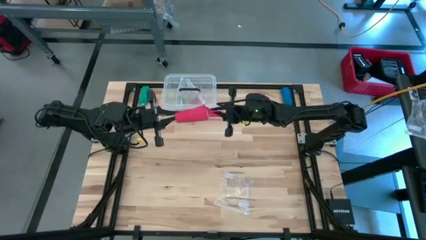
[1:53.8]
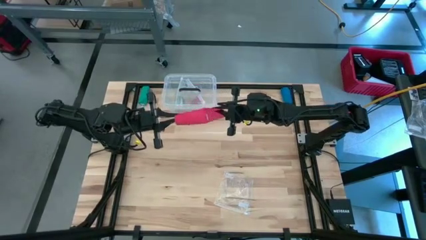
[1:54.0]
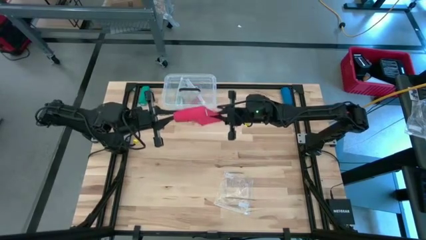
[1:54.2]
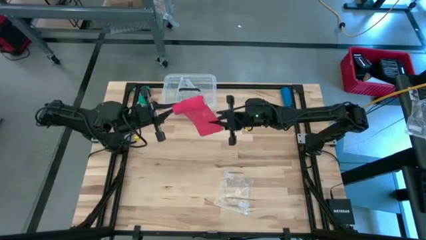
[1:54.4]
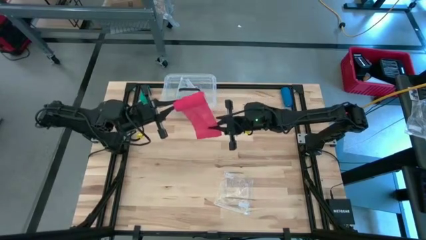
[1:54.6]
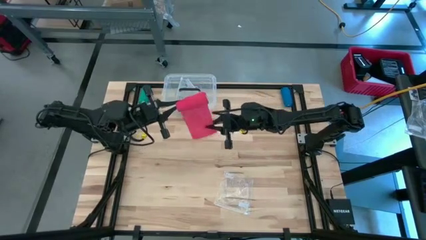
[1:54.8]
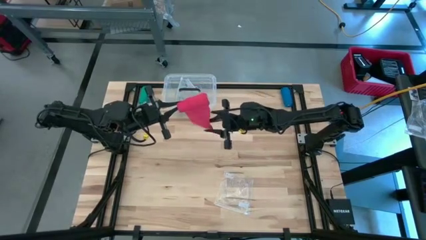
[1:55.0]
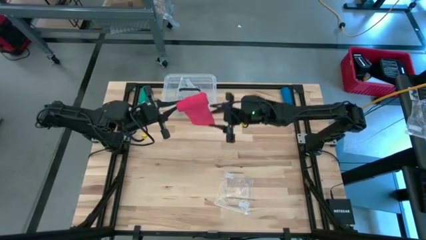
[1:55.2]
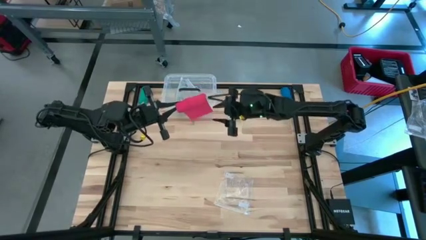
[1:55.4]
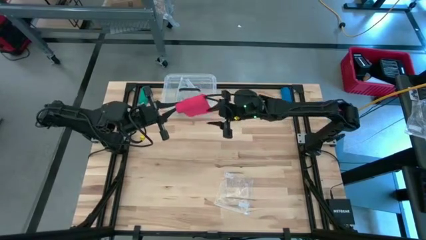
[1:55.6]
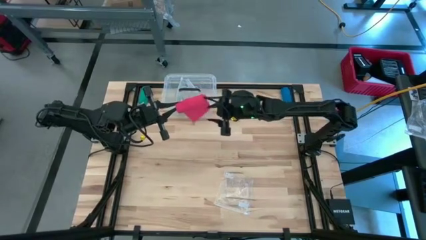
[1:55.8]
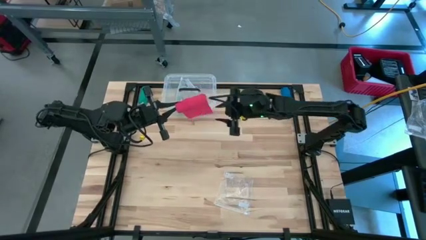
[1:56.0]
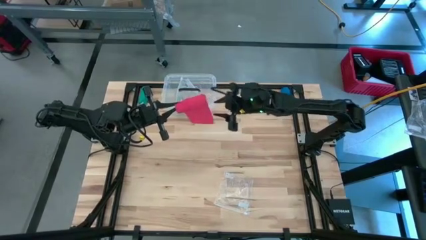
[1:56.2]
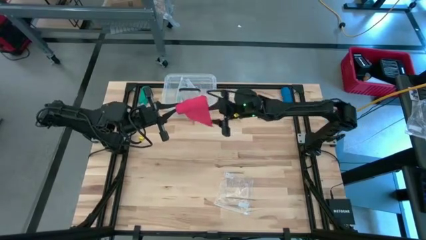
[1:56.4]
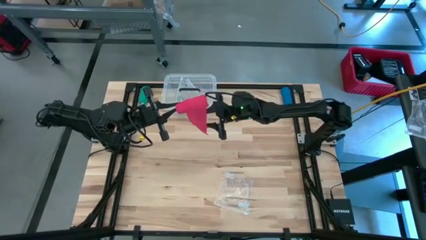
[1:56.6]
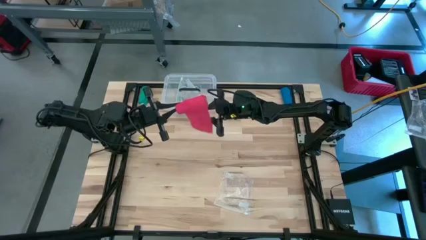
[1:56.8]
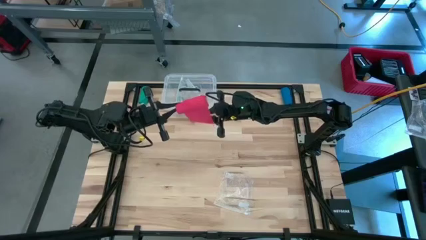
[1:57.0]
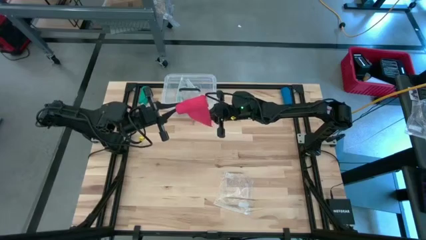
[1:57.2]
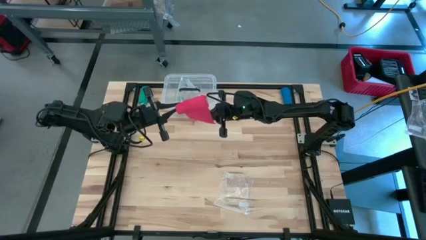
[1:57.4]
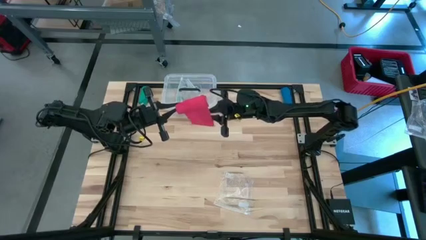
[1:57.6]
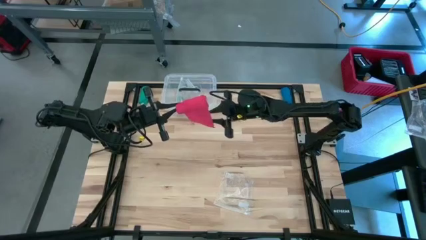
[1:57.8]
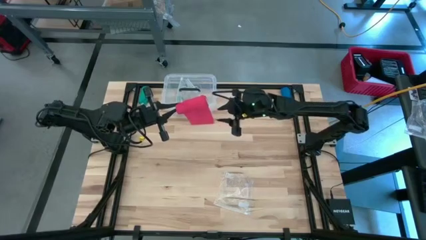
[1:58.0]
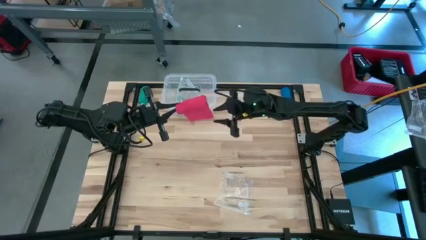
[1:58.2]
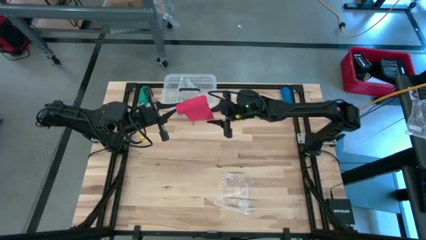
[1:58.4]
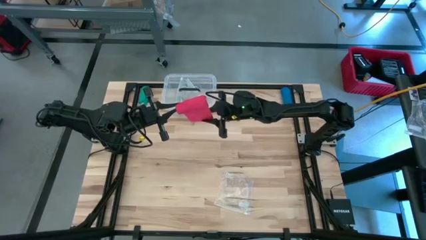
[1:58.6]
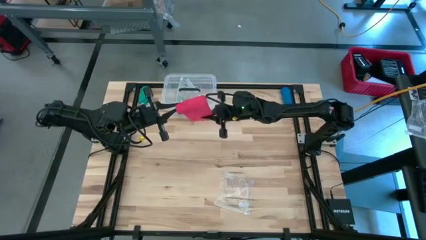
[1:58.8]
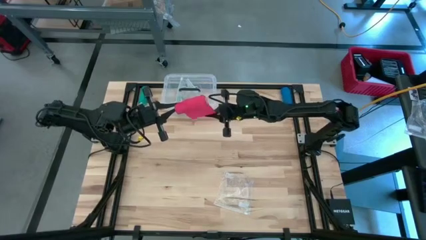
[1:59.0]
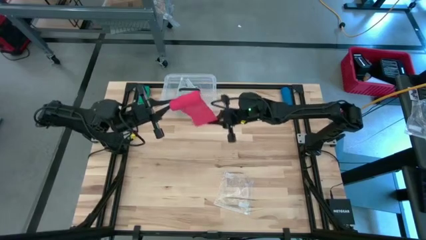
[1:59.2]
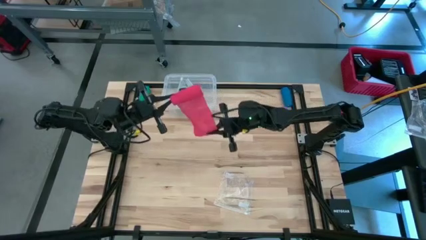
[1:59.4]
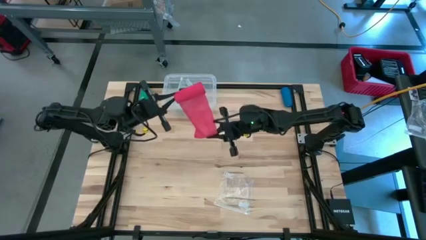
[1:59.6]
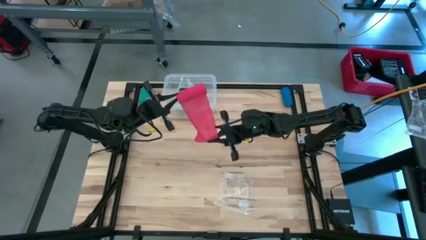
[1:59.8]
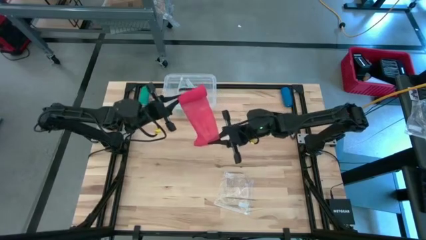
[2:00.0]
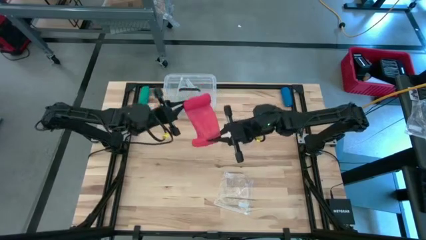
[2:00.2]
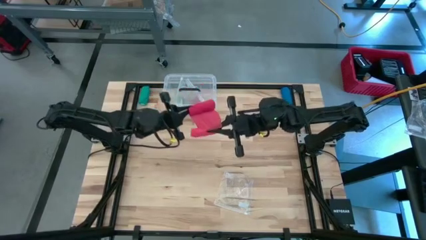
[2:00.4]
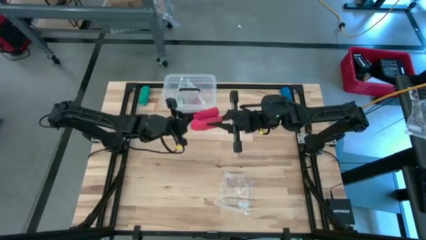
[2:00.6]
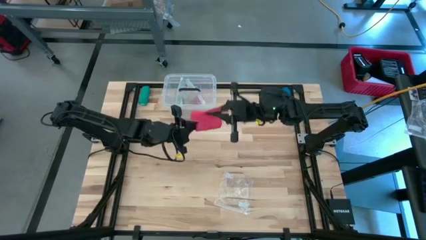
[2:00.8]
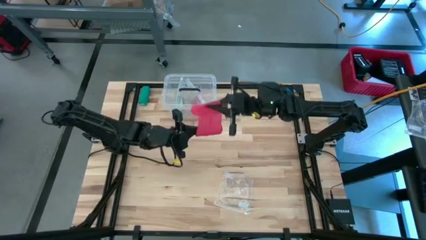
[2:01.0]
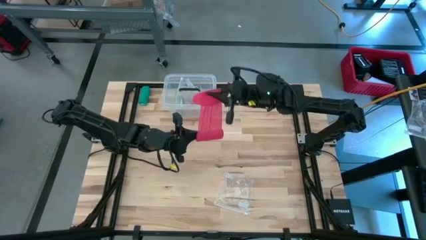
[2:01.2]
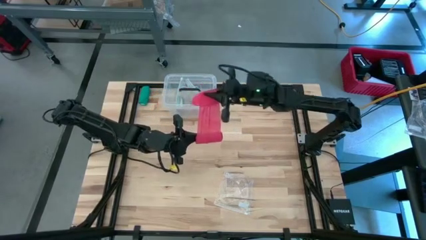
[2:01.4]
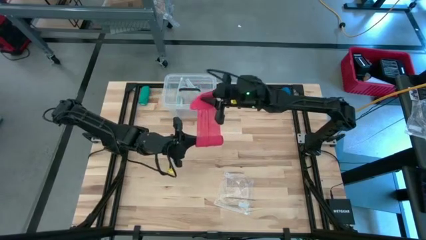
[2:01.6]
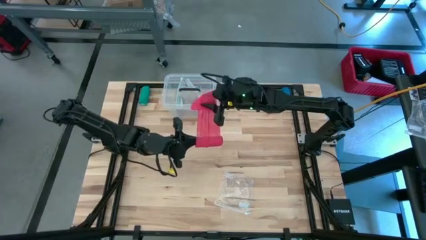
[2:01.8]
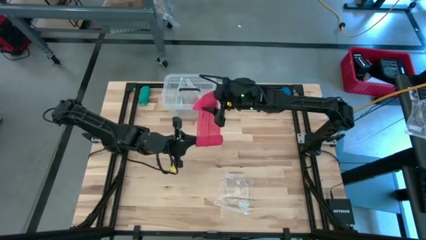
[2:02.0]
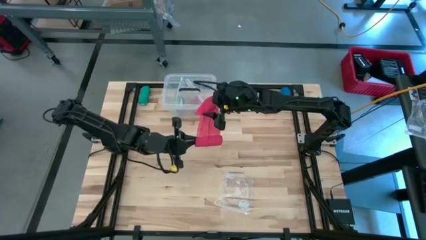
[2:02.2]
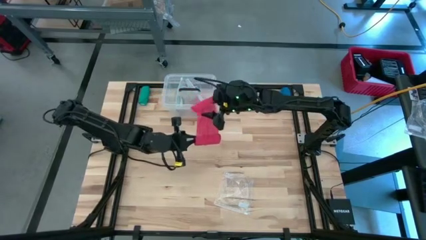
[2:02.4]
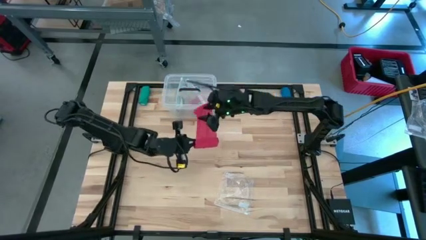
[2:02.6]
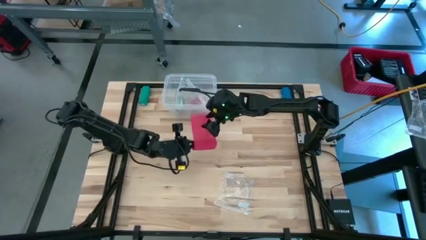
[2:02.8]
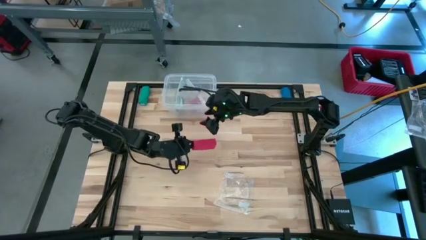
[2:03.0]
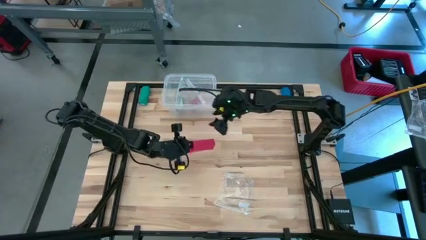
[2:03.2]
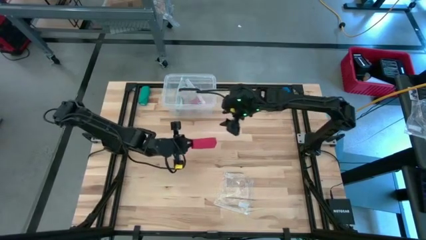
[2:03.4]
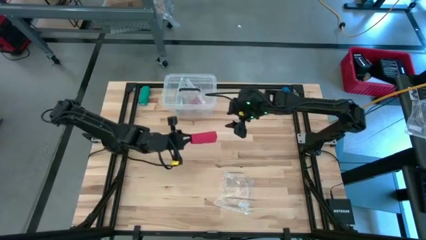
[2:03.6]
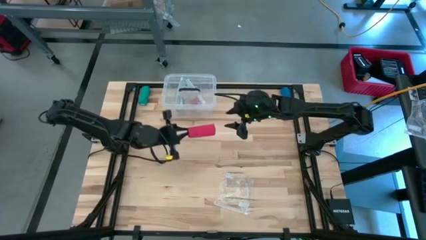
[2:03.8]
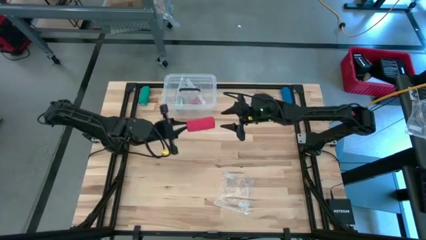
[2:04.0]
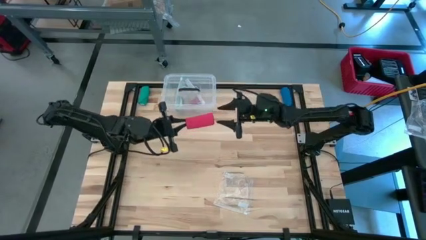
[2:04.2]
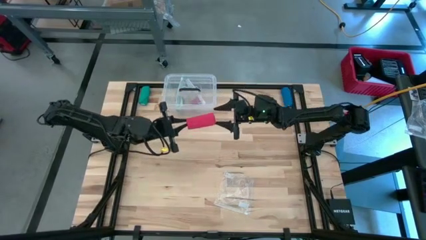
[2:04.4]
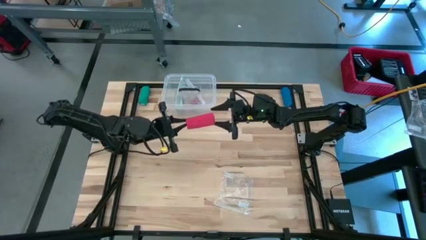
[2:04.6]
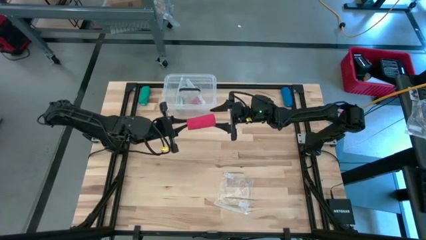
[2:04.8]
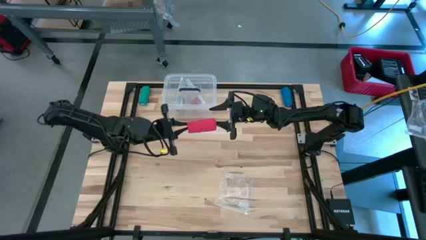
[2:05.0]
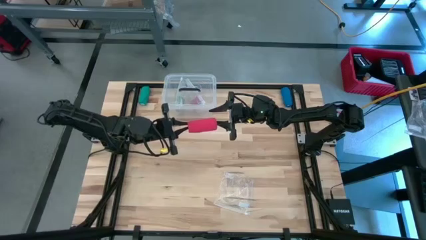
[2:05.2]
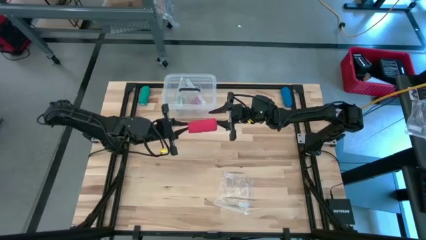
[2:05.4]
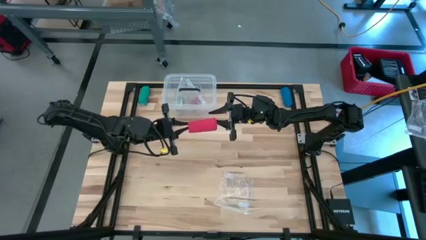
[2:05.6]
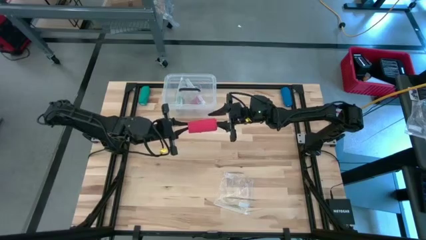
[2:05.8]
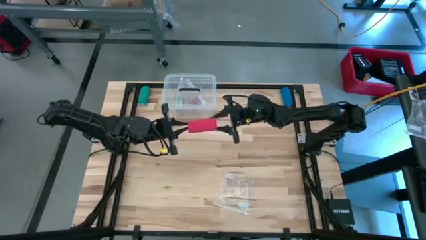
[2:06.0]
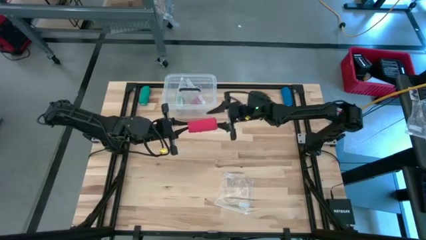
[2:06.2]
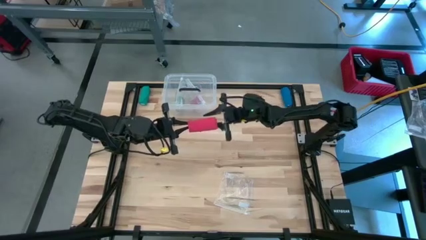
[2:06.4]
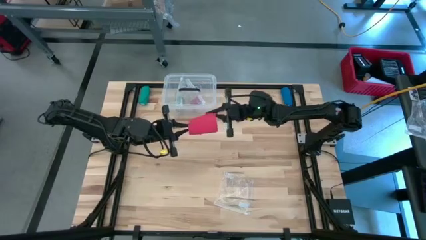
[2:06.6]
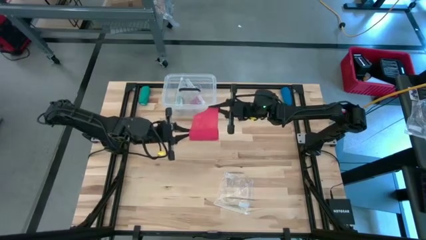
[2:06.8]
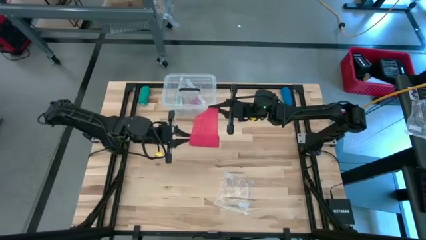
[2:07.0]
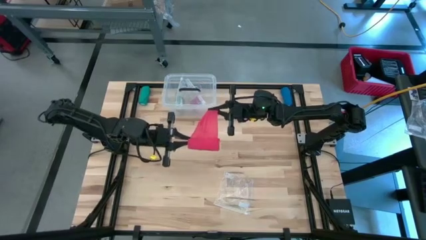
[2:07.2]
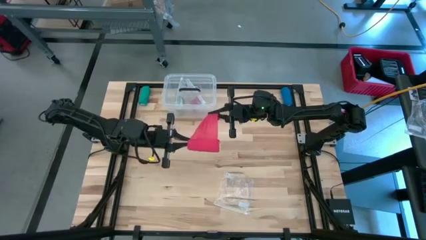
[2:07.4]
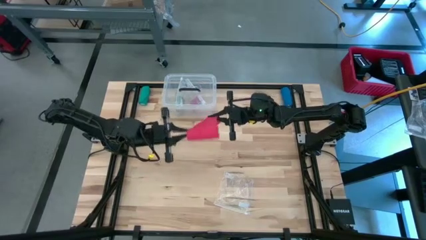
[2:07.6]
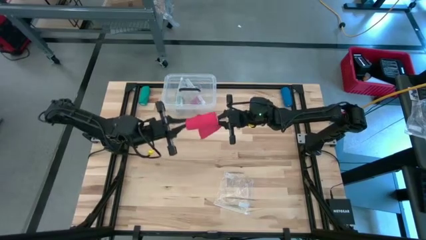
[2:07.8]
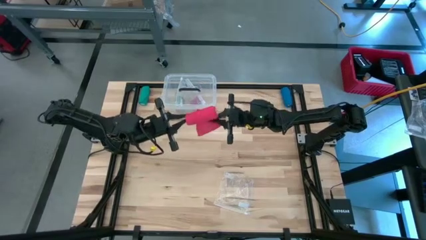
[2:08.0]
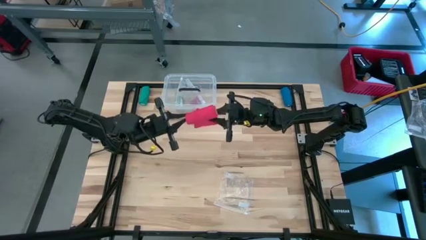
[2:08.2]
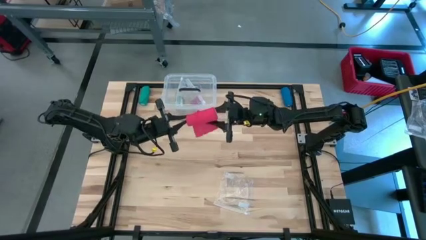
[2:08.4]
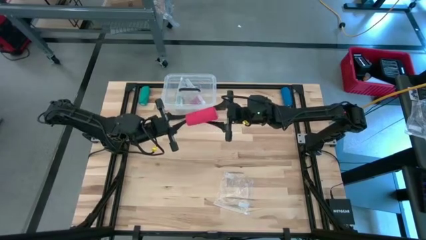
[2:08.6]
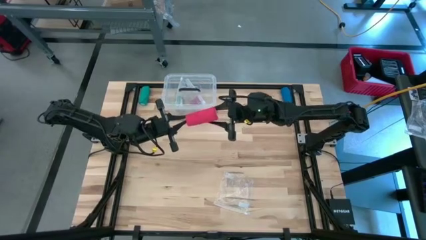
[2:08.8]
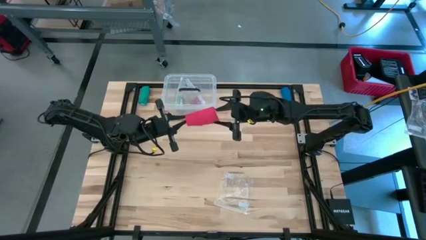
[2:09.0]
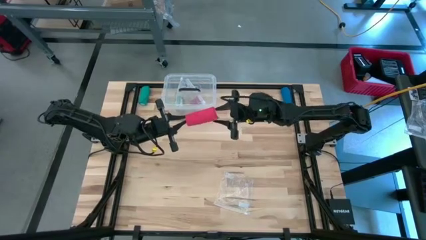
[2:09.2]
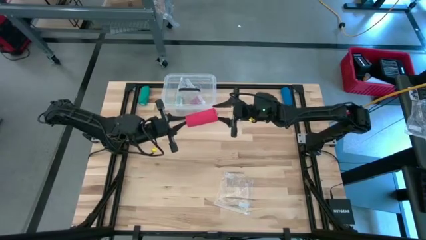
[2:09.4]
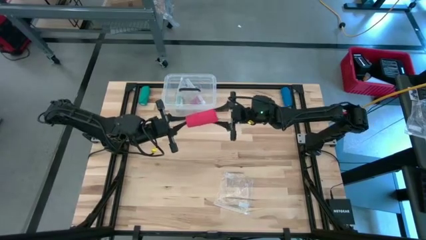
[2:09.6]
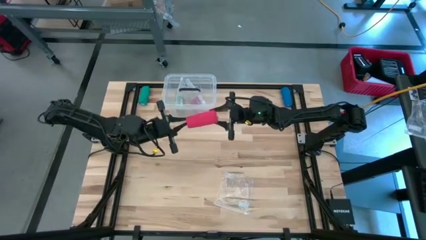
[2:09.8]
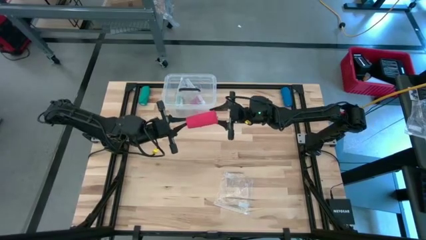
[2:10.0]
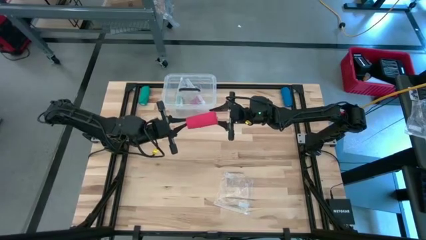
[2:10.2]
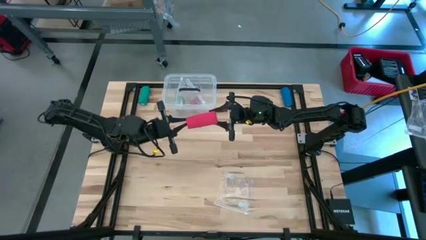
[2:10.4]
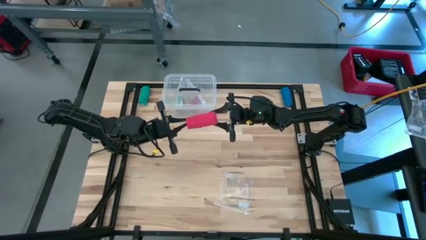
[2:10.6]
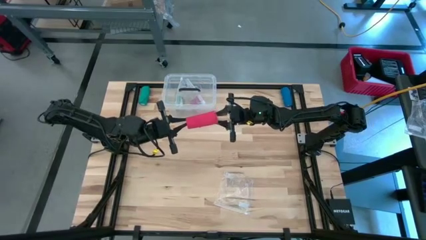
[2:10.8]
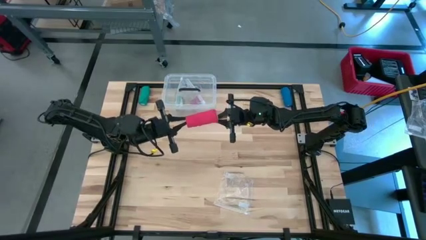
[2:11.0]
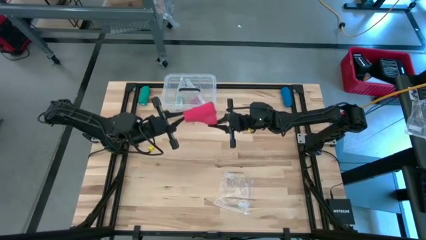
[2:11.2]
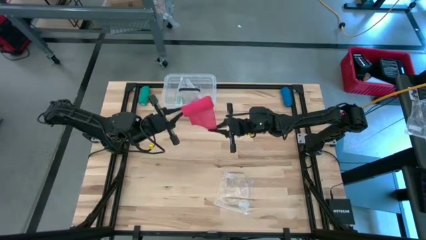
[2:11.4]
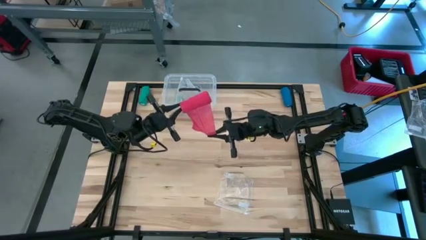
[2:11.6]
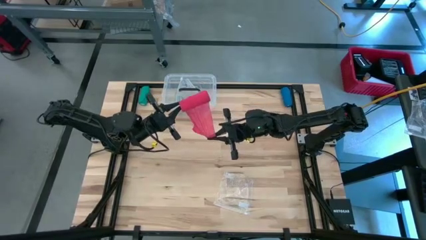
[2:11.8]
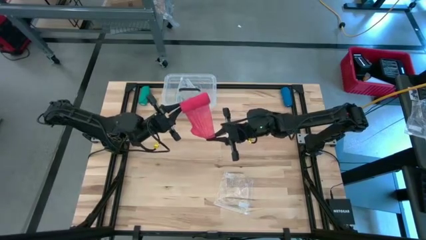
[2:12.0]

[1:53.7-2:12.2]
Task: Roll bandage
Roll the red bandage
